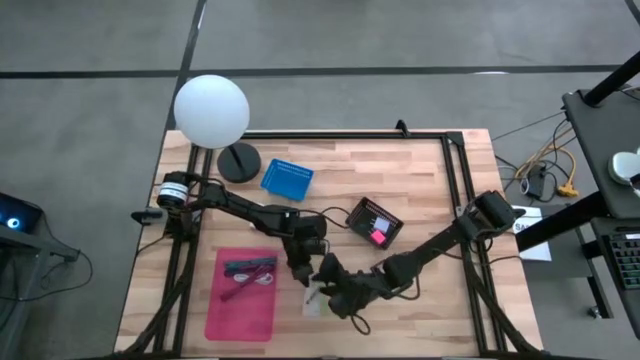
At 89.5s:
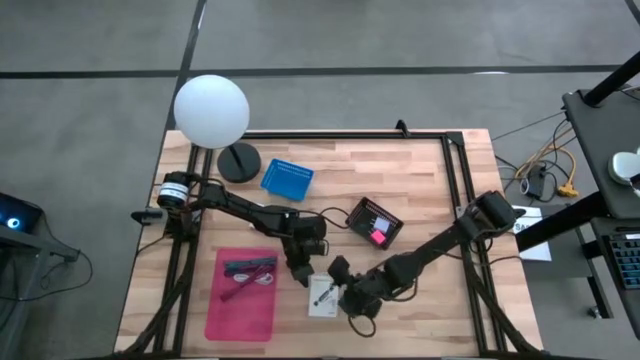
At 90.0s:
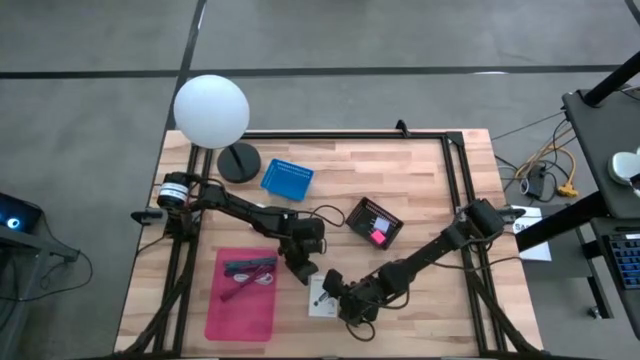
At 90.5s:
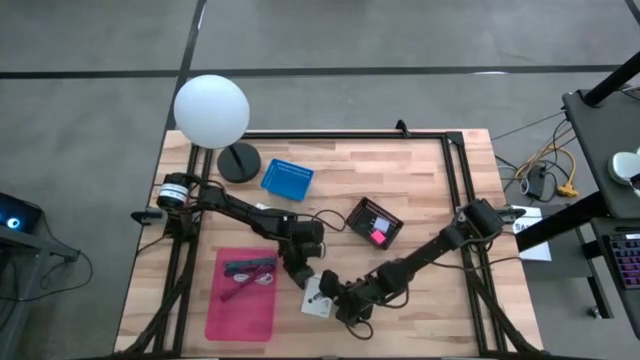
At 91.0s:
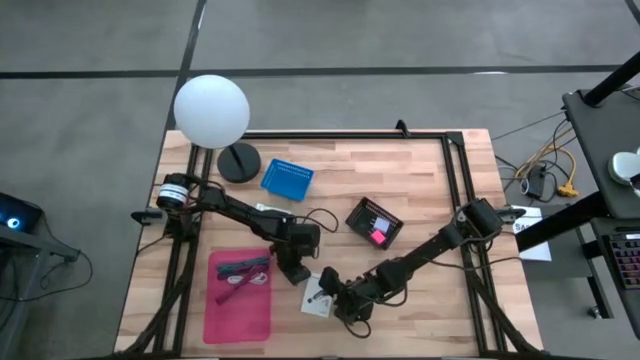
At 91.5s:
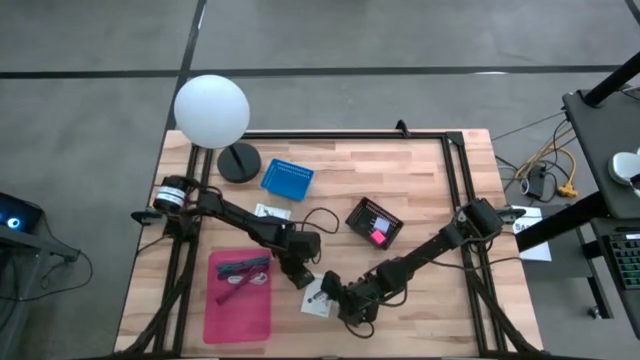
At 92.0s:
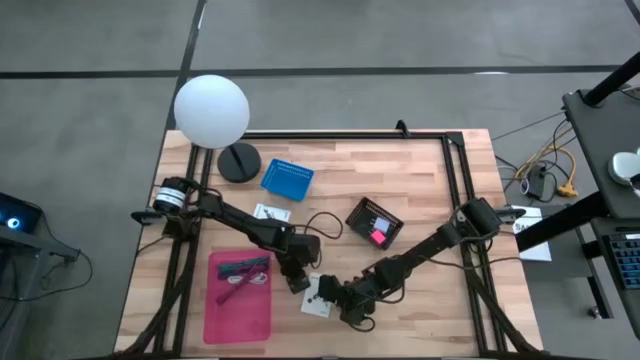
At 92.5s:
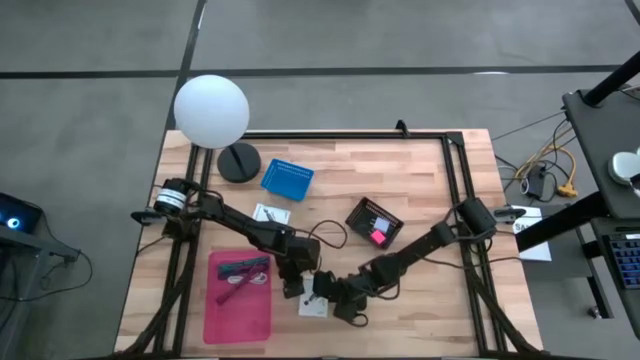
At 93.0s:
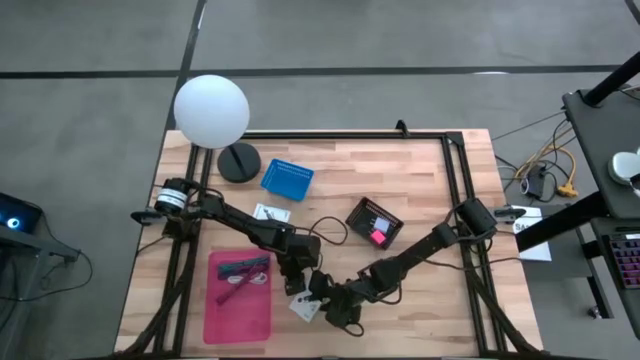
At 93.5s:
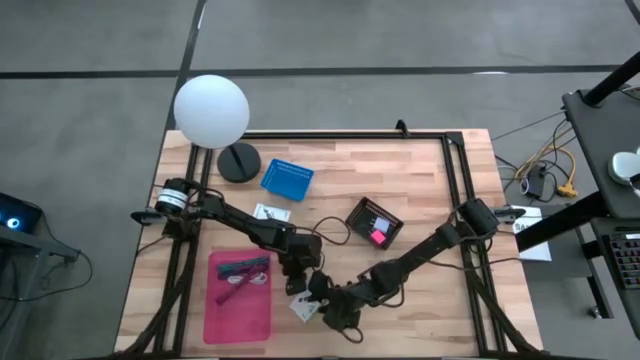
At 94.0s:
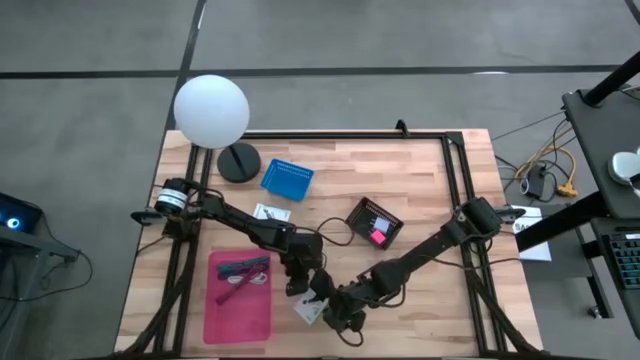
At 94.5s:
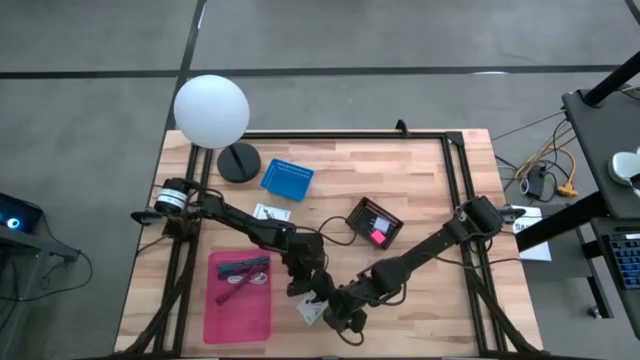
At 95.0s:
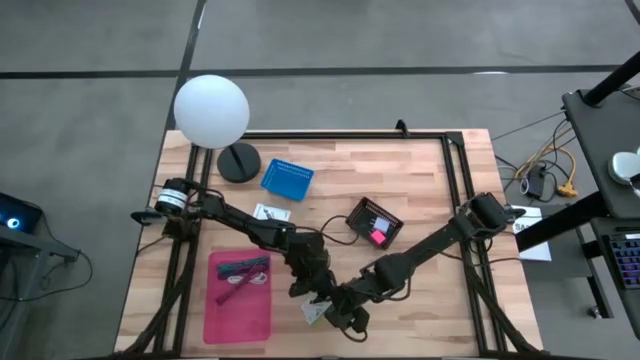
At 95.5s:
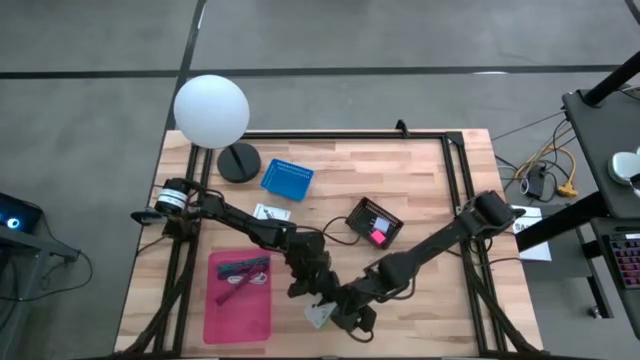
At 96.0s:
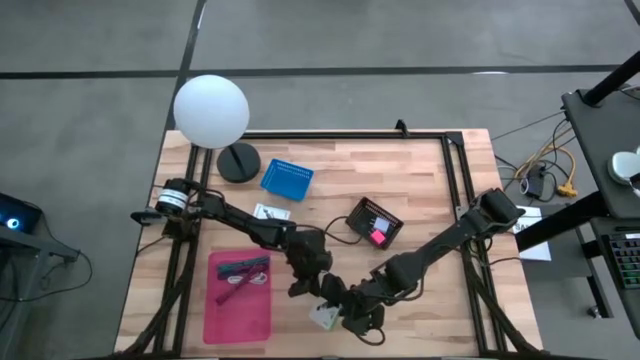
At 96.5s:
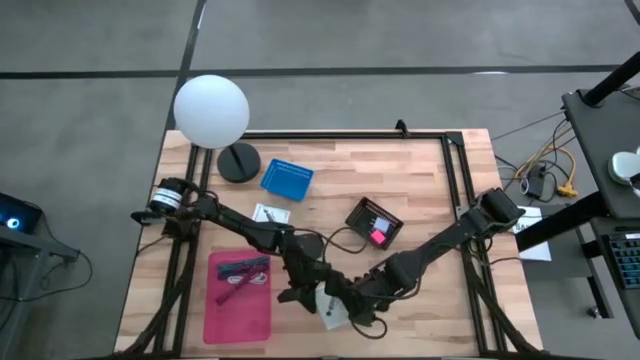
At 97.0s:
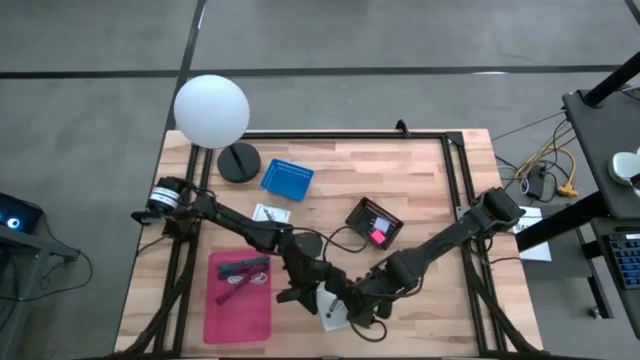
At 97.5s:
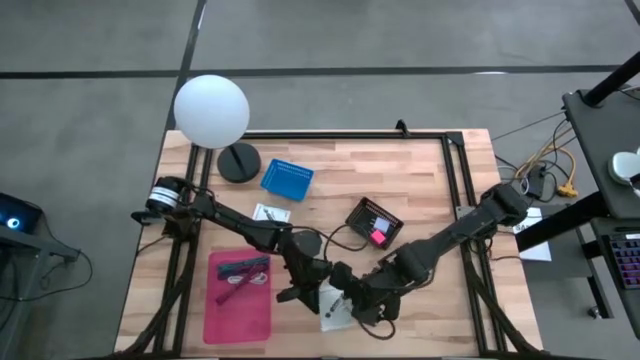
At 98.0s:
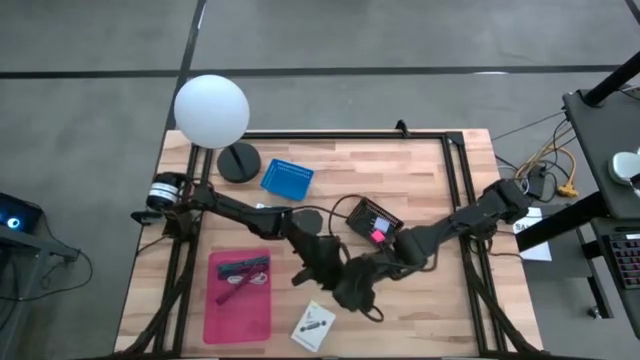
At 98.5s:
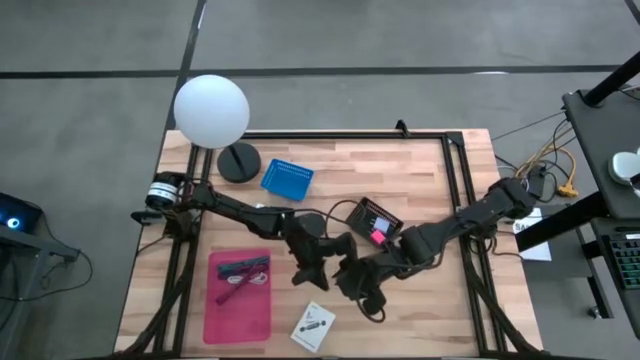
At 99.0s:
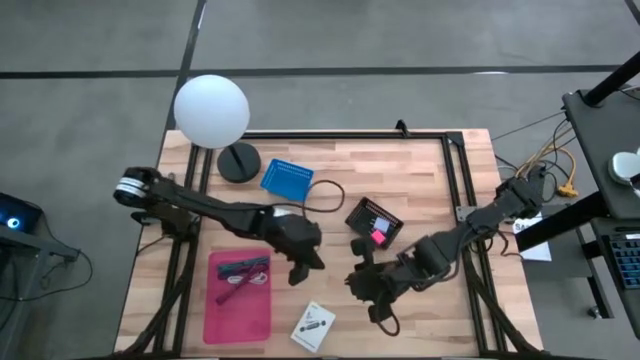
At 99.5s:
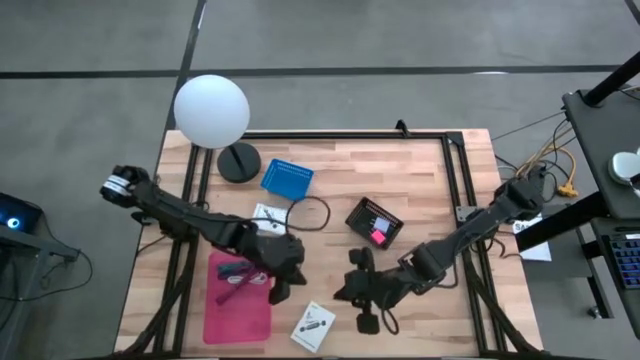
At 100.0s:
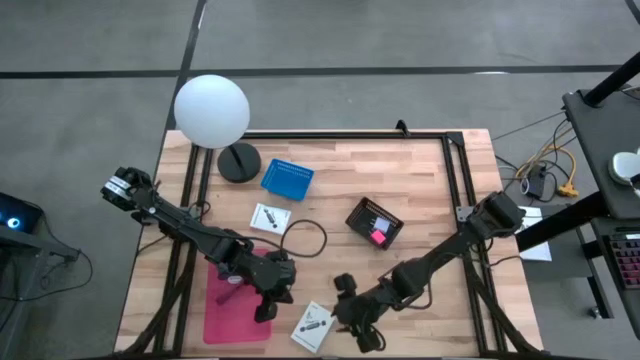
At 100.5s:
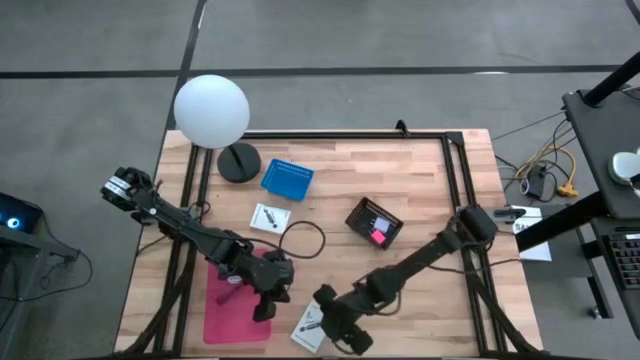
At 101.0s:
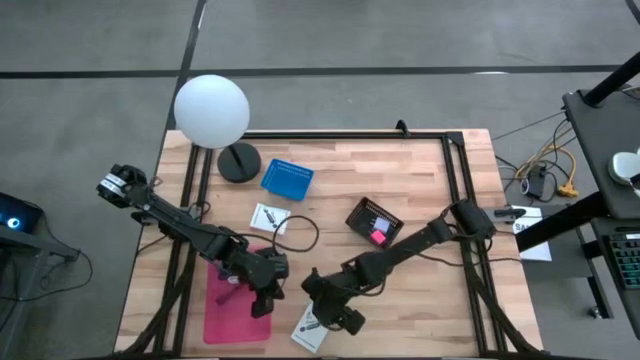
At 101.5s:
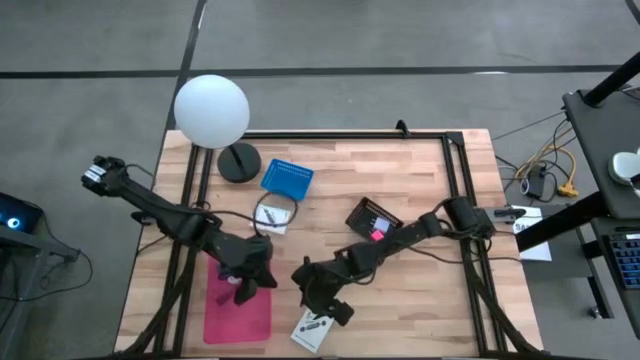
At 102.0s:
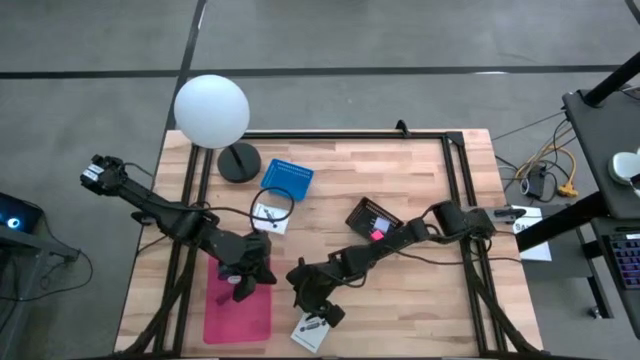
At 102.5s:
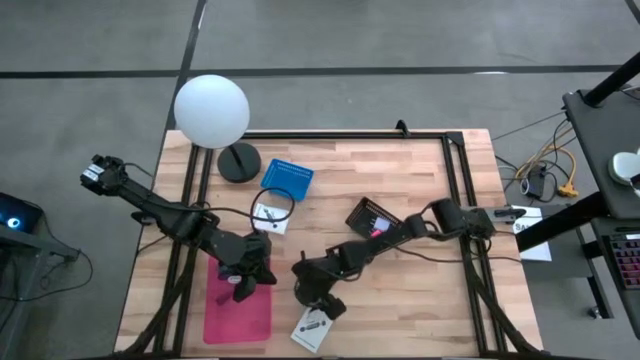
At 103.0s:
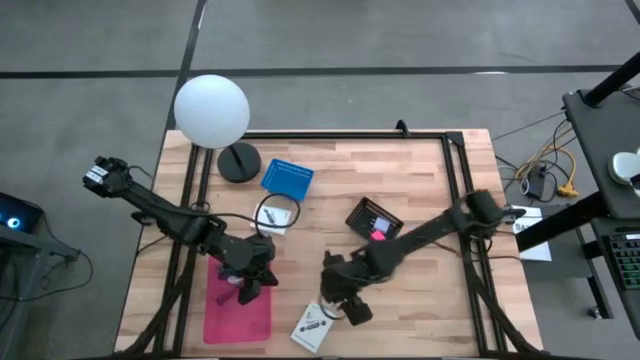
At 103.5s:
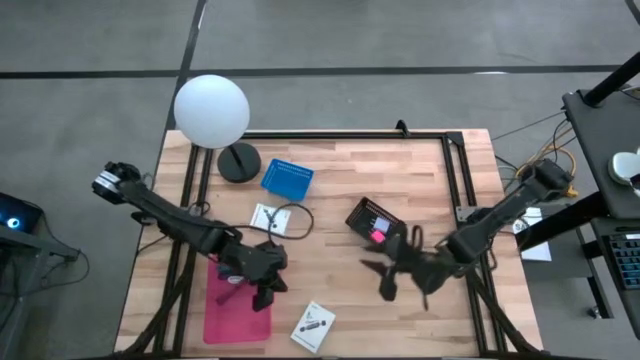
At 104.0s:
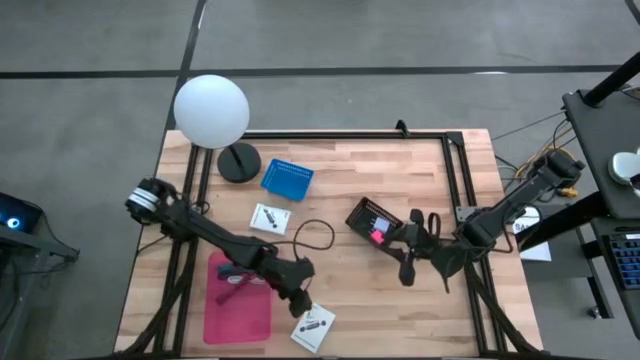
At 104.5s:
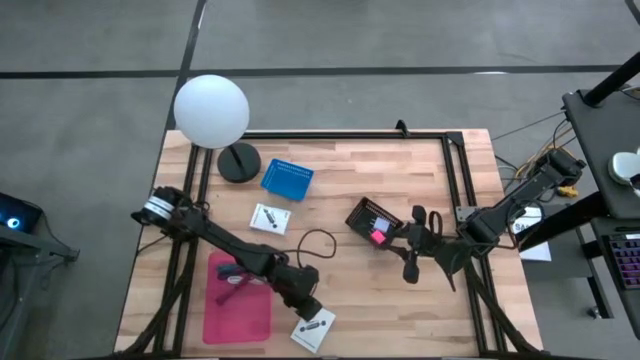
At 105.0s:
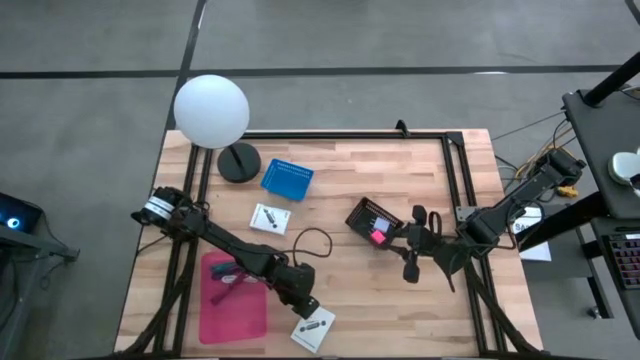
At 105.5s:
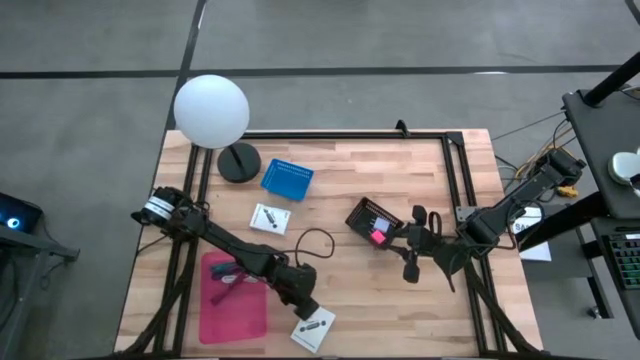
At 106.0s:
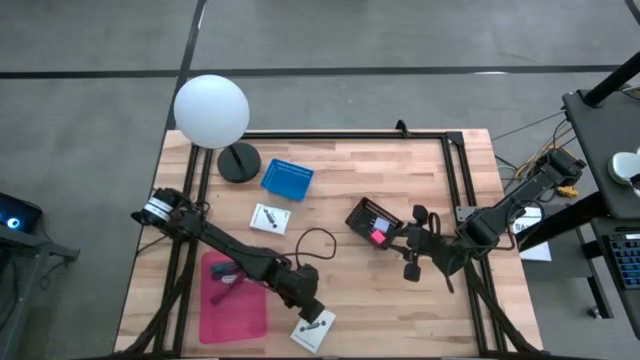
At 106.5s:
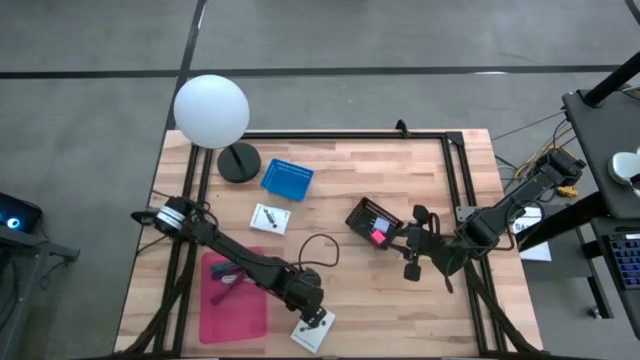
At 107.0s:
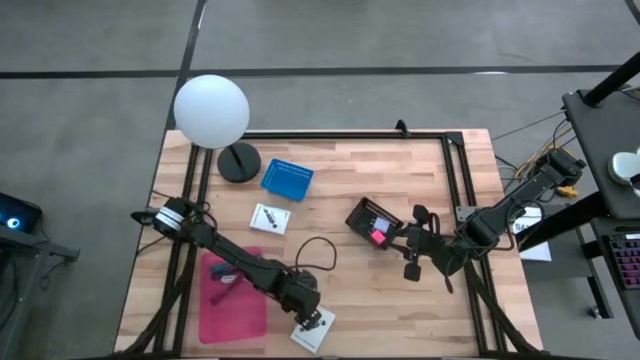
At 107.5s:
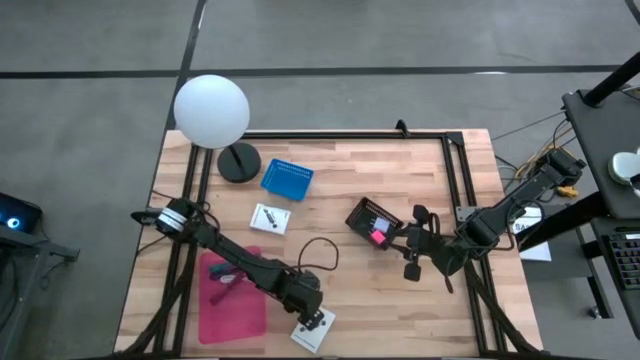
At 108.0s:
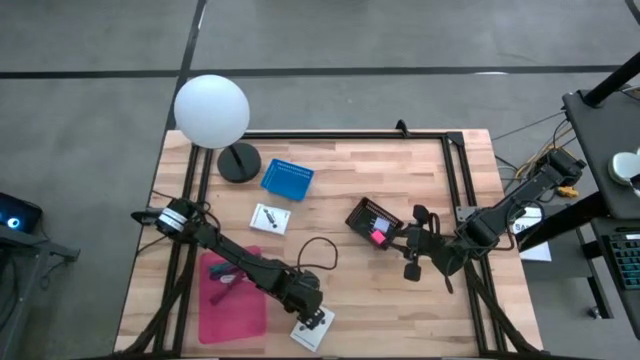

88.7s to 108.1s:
Task: Pick and place items into bin
Put the bottom white card reader box into the blue bin
